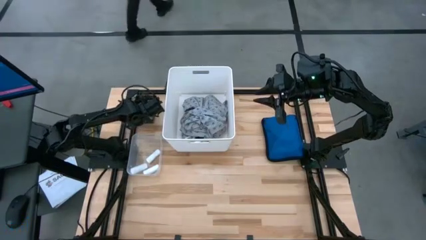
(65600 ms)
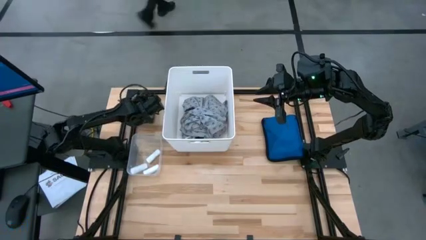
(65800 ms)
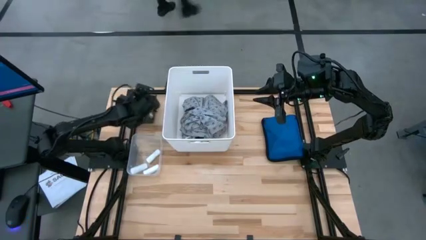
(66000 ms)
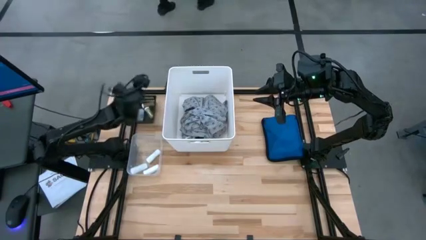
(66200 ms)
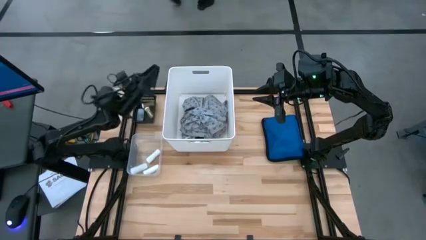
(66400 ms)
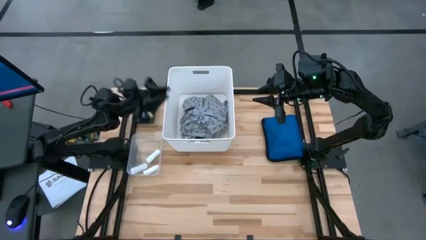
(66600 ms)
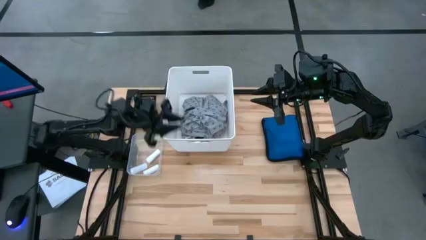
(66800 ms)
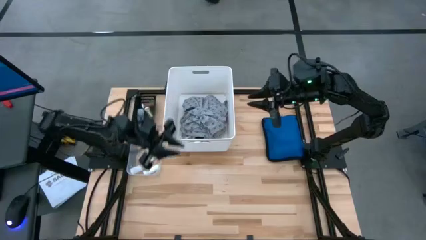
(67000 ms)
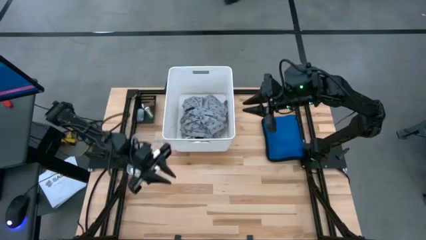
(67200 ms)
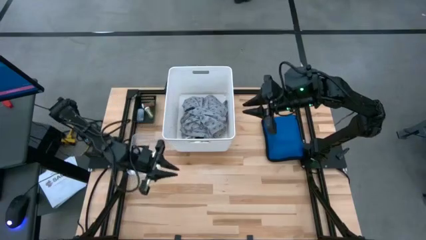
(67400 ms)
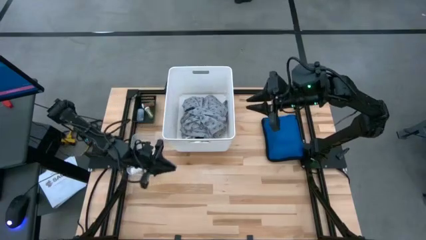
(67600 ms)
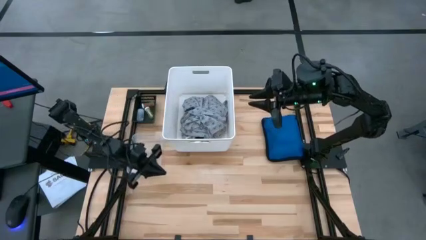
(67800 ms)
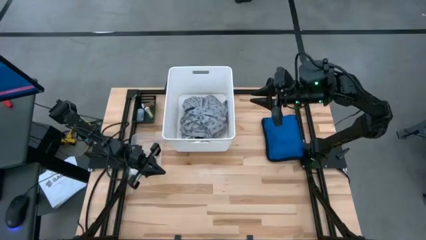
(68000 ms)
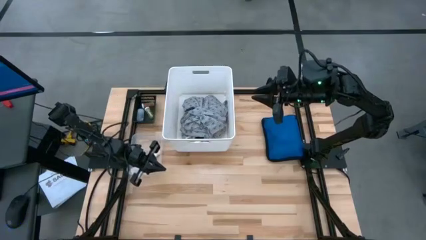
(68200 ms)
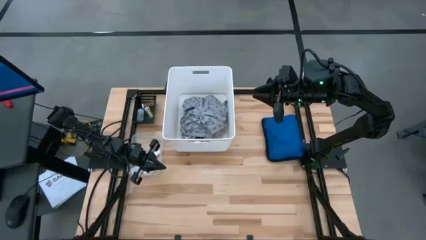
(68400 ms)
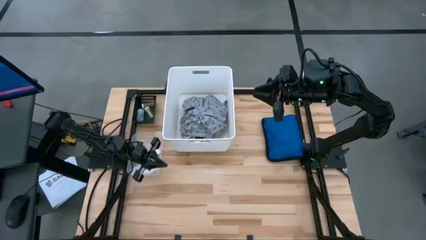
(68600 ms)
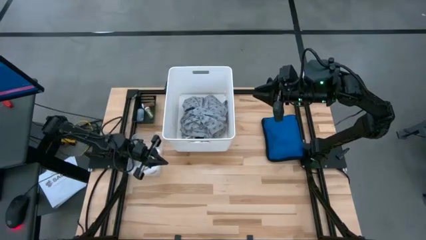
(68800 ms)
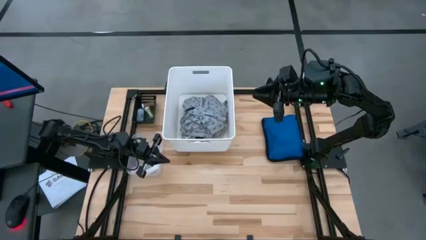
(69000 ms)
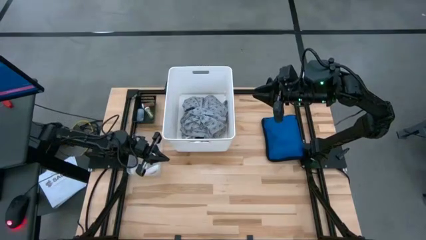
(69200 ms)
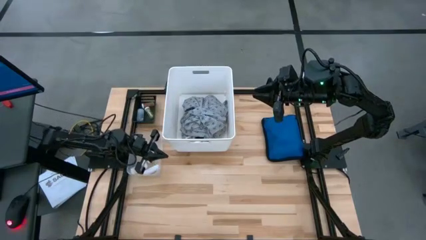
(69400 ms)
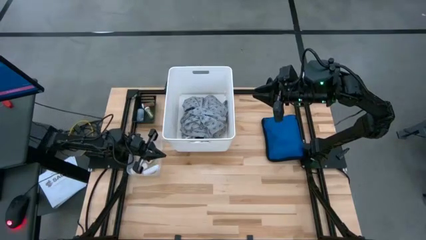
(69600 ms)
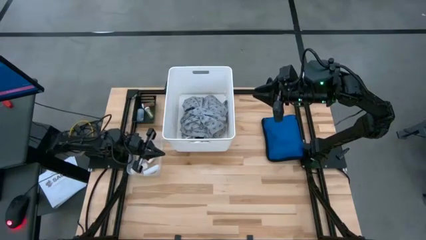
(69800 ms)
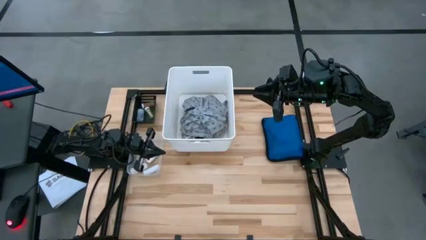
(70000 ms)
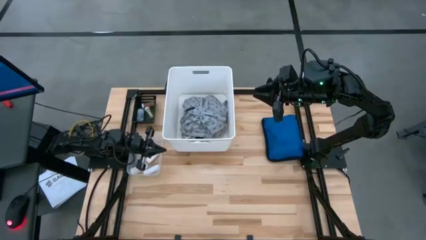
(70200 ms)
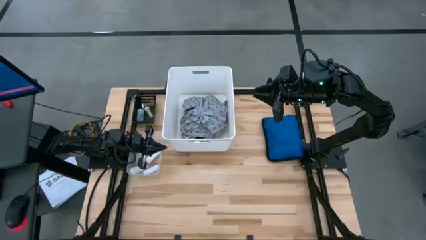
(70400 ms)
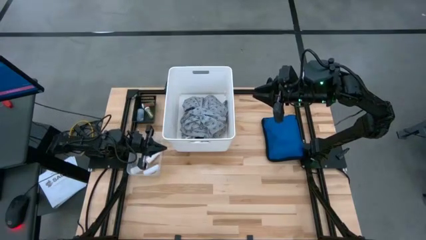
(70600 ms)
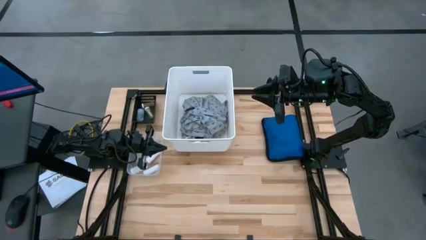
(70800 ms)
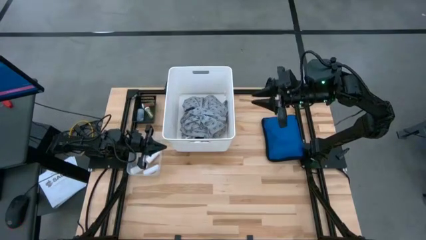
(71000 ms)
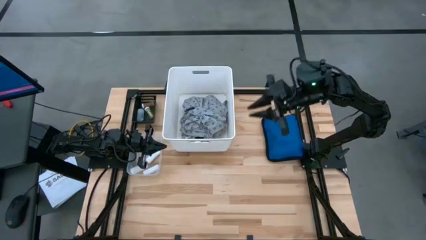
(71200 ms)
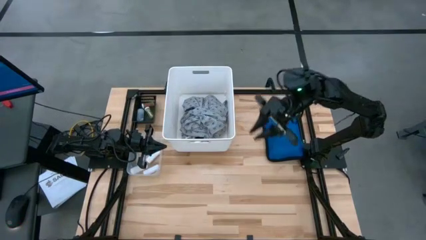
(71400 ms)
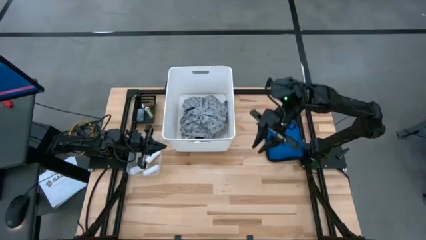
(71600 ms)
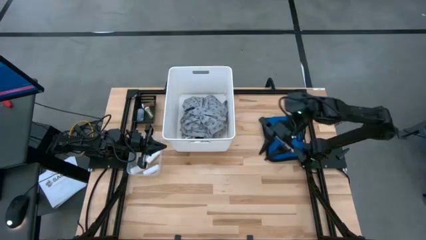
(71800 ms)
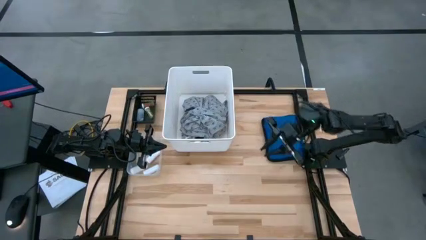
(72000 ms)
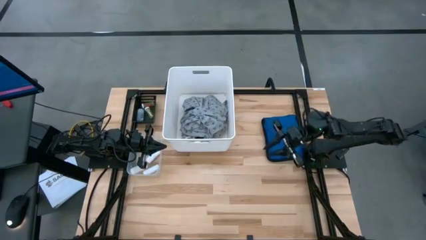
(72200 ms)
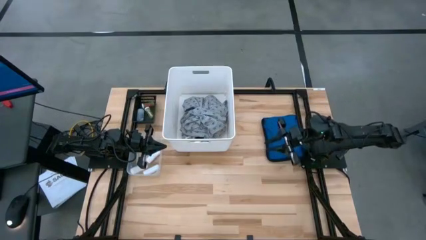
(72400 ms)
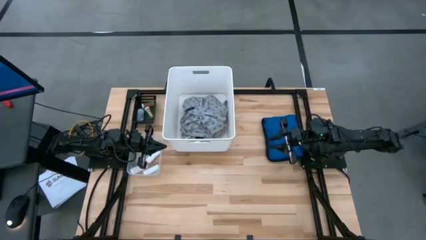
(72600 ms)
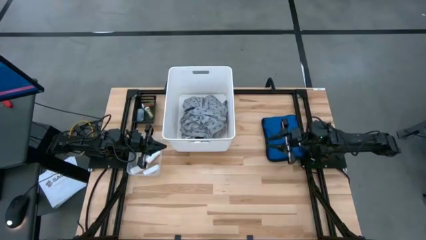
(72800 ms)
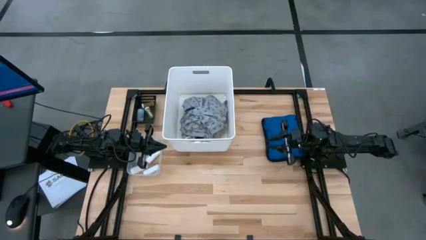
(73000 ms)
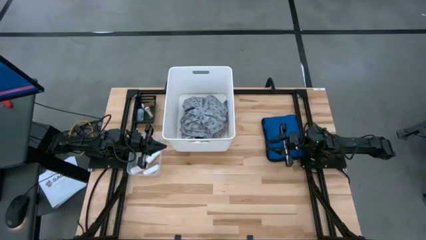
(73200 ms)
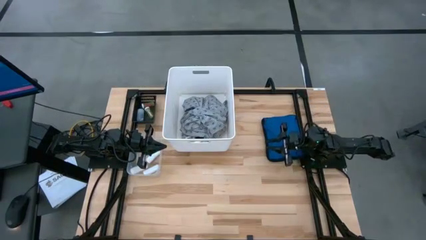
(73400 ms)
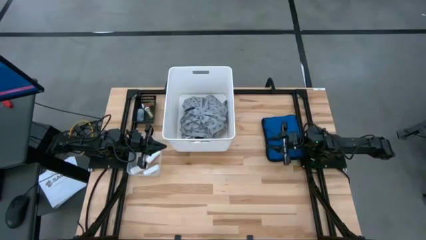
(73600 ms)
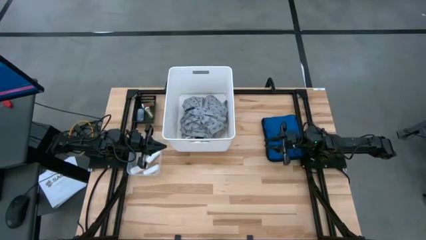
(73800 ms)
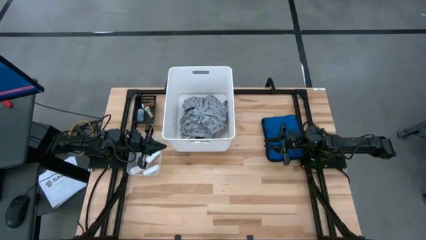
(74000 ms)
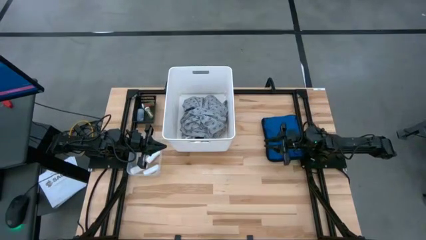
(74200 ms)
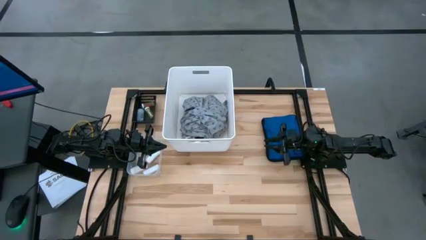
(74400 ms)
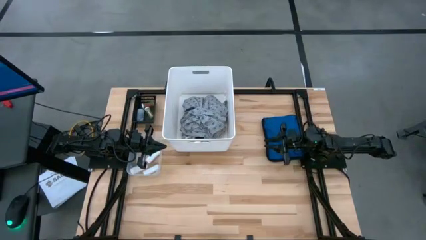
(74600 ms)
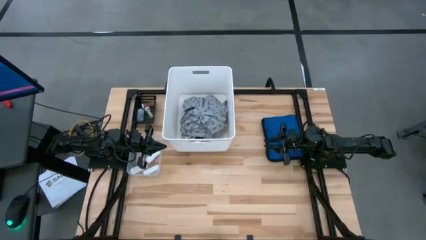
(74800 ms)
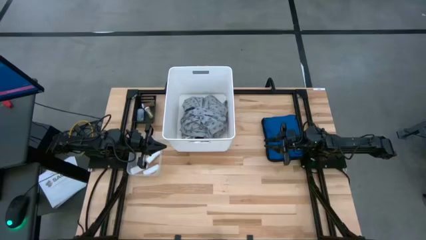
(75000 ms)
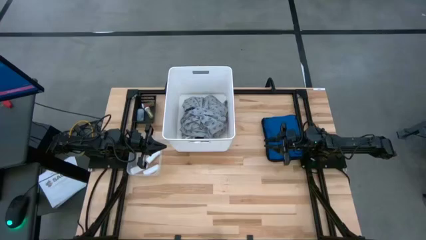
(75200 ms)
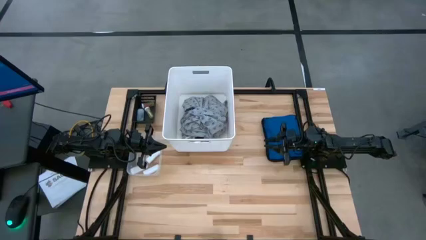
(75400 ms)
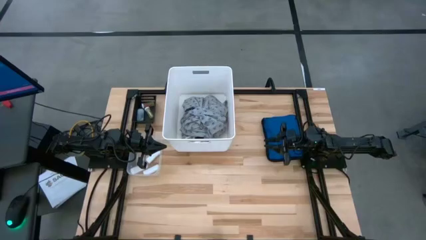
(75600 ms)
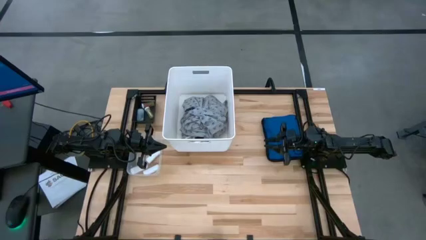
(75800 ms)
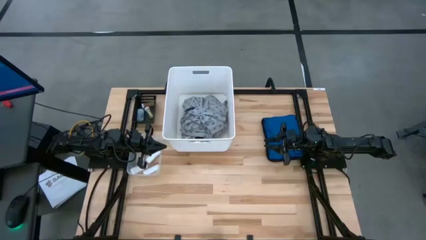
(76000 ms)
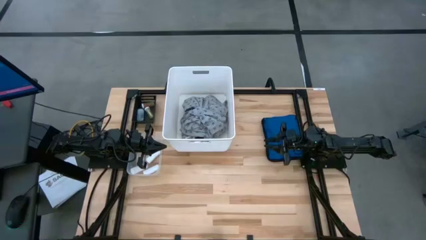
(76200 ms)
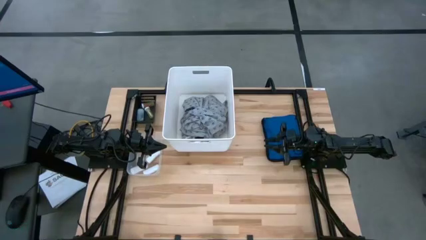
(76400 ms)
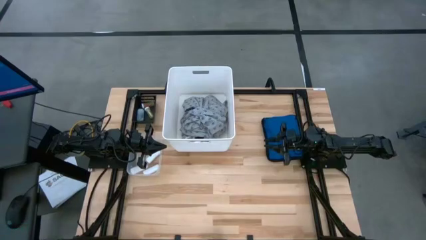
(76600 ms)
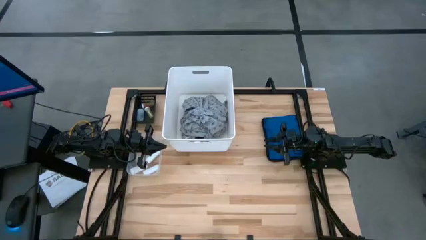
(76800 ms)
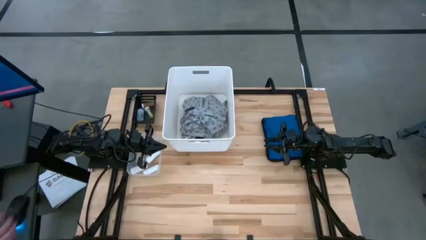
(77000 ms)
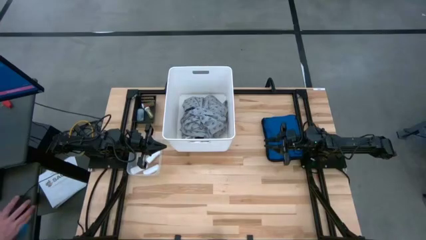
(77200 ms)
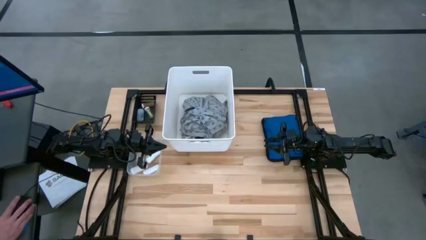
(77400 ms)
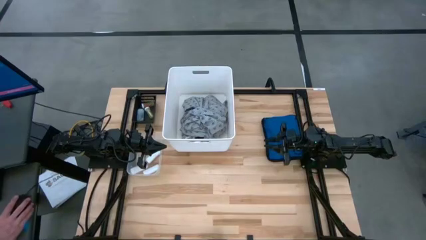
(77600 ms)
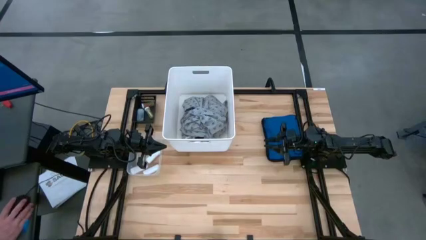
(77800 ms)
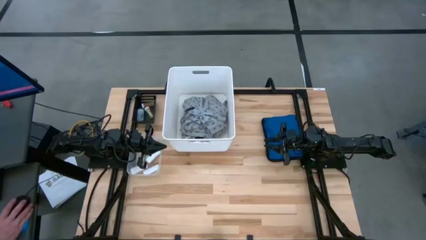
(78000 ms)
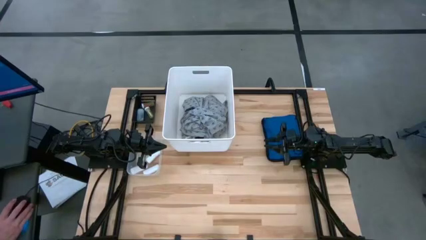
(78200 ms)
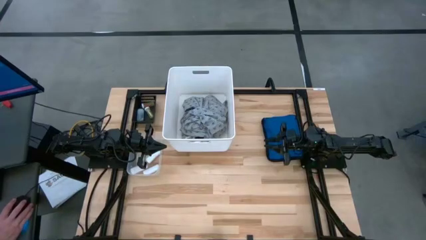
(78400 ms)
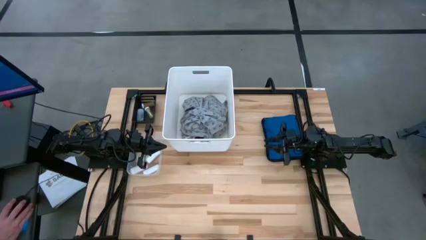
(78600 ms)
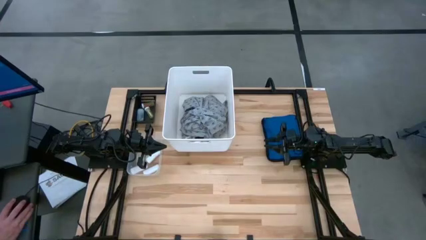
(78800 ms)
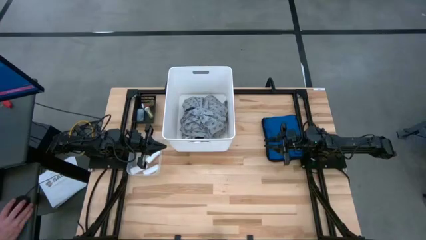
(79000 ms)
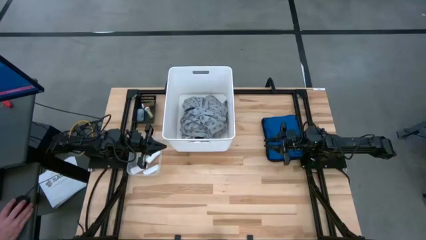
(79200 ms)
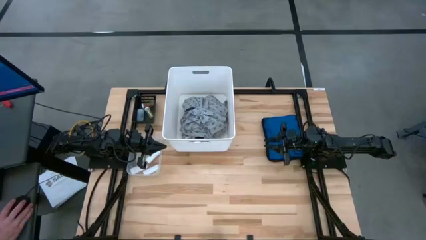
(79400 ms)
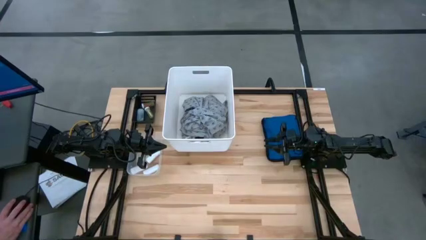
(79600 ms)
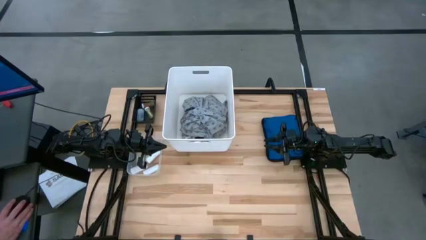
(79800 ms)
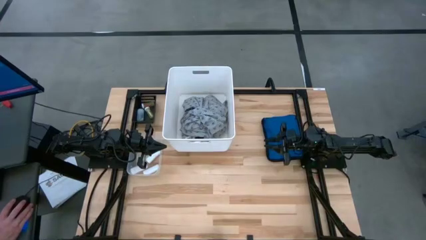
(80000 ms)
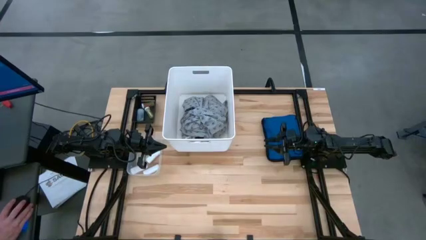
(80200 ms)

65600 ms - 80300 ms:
Task: Pick & Place Medicine items
Return to Home Position
